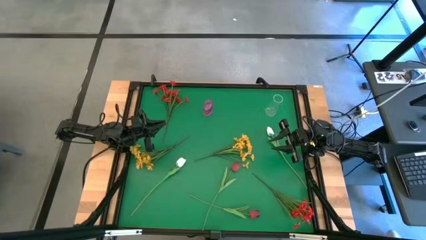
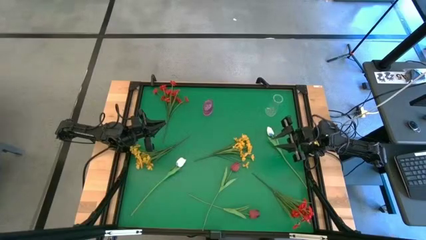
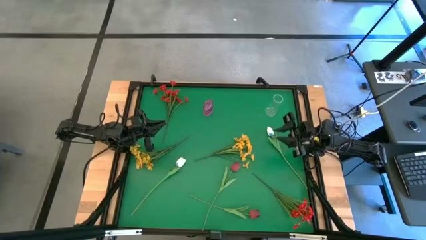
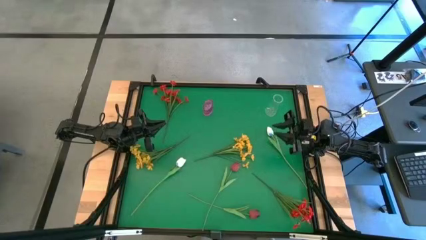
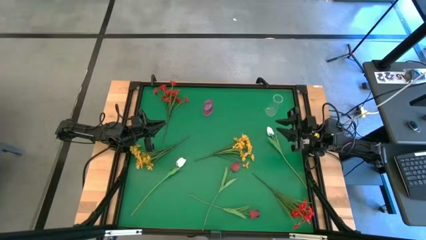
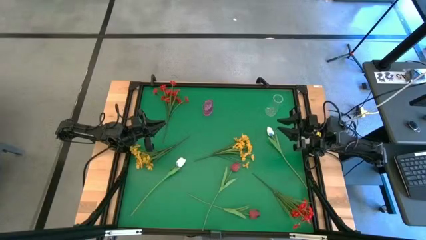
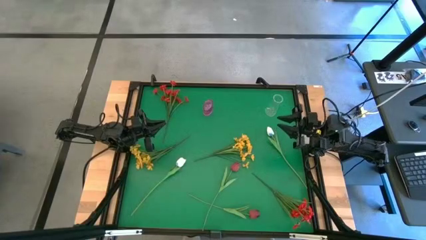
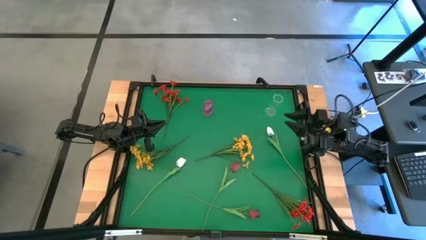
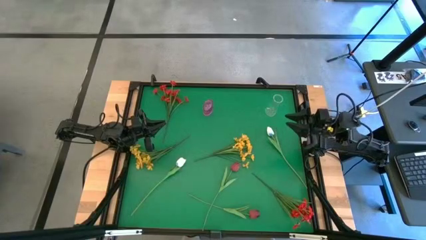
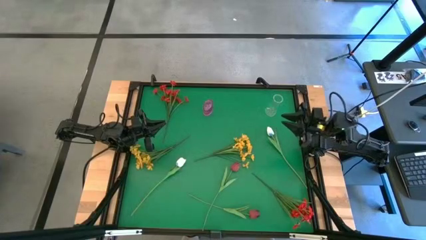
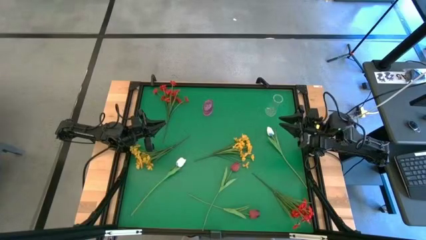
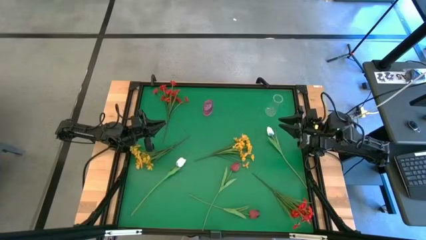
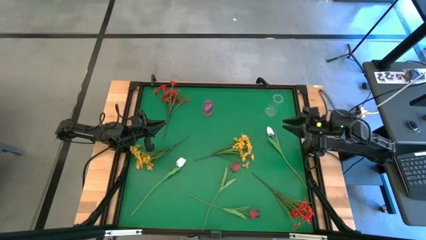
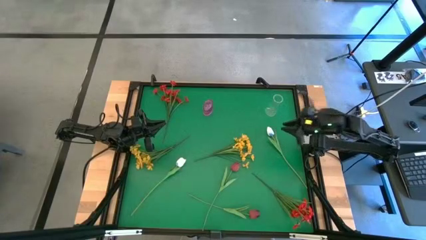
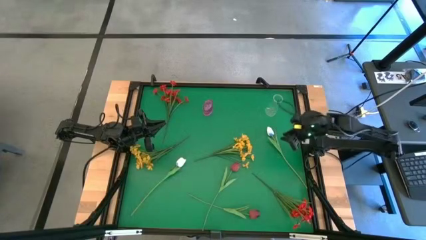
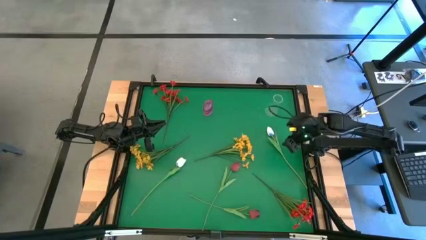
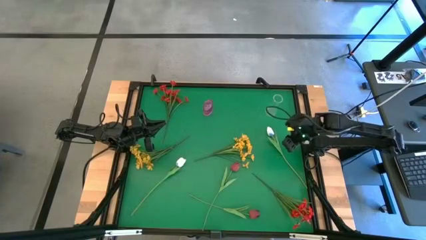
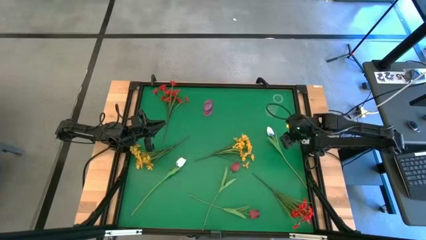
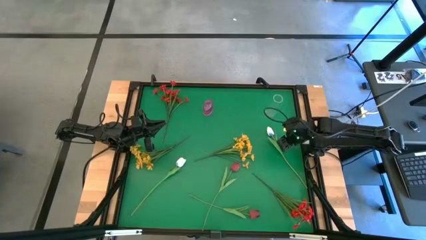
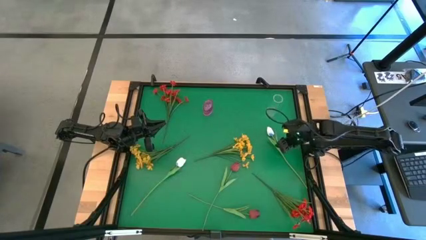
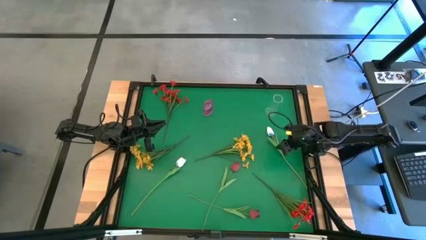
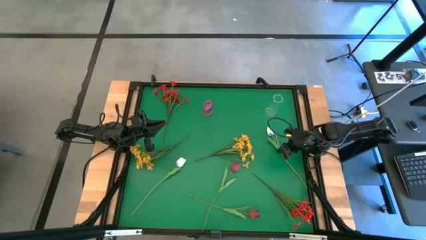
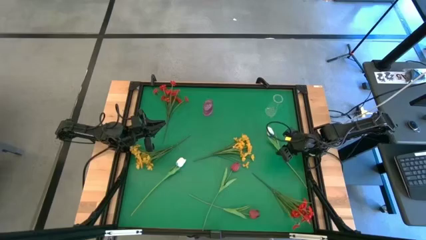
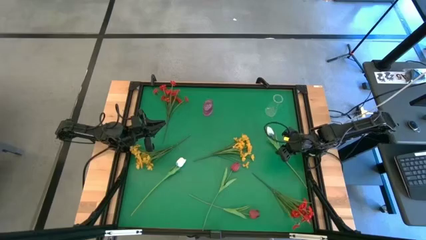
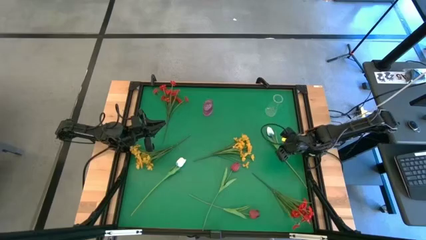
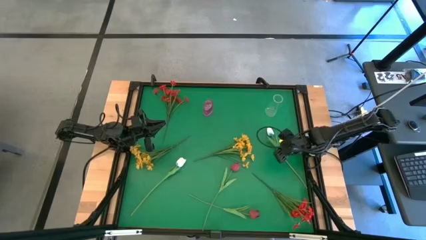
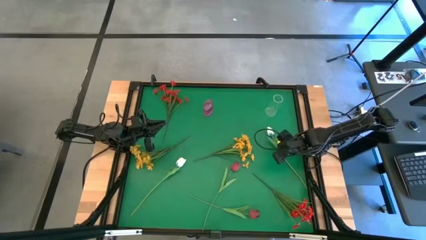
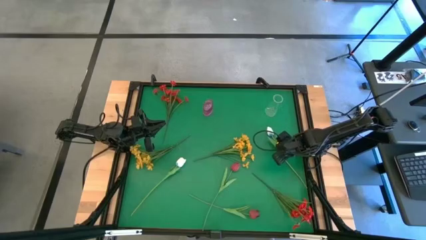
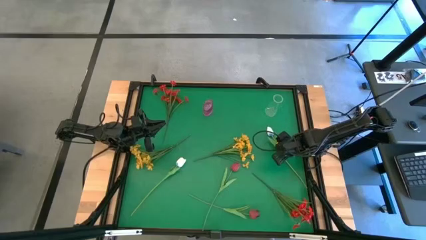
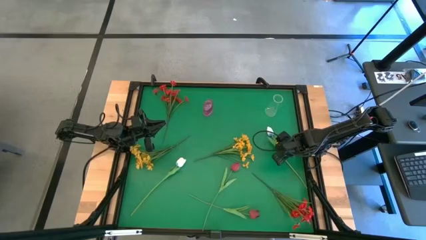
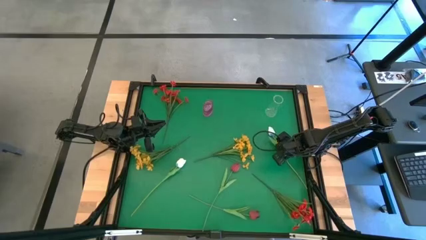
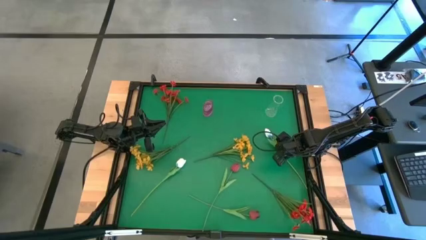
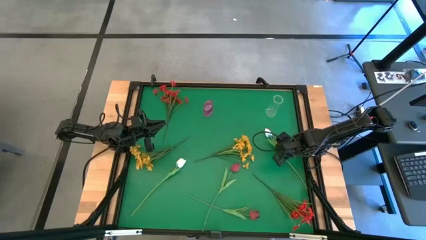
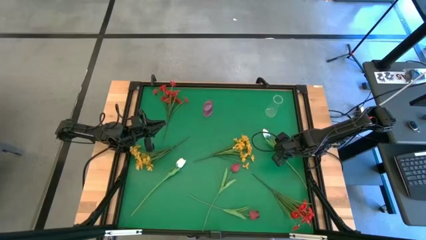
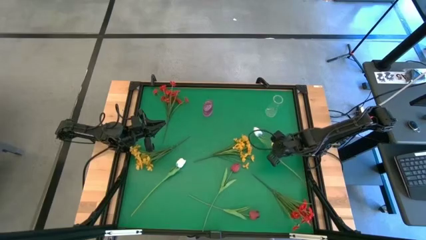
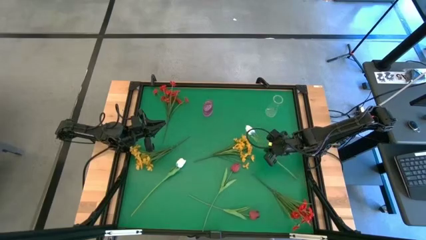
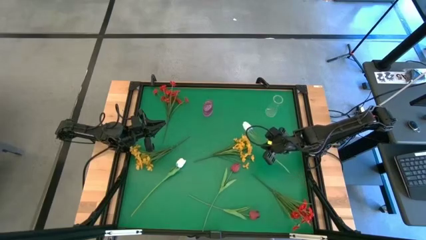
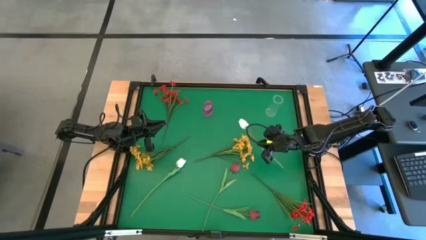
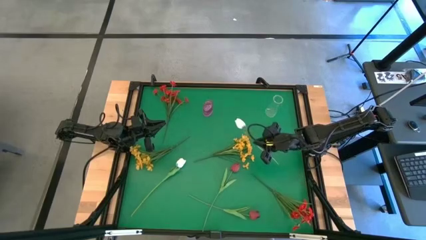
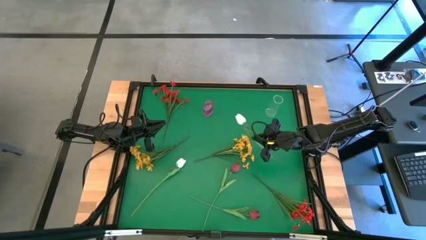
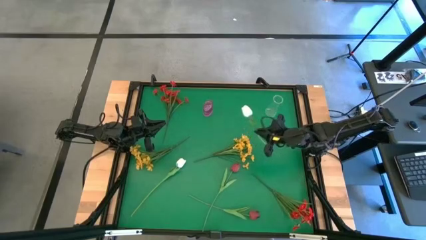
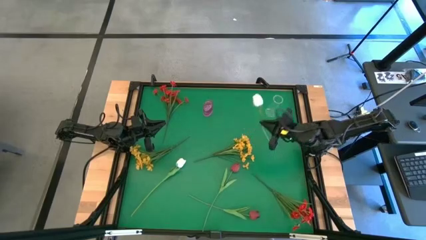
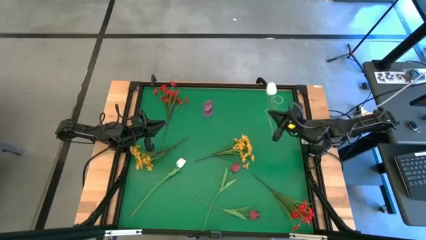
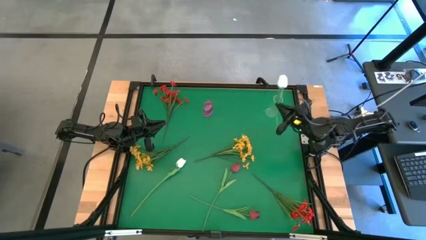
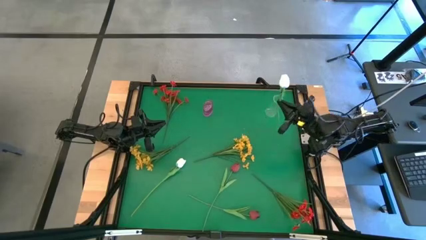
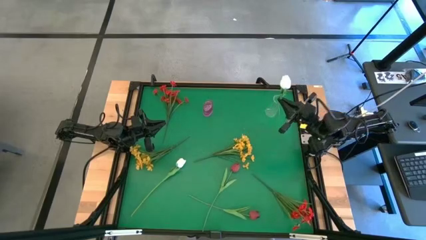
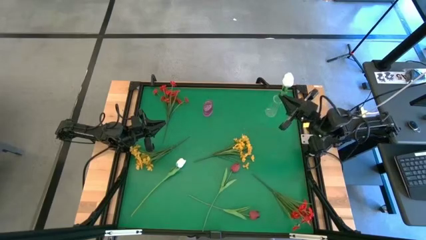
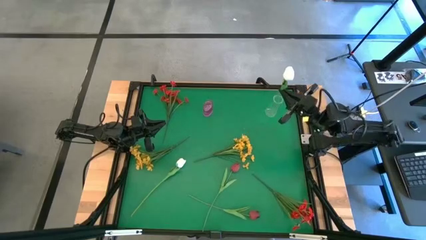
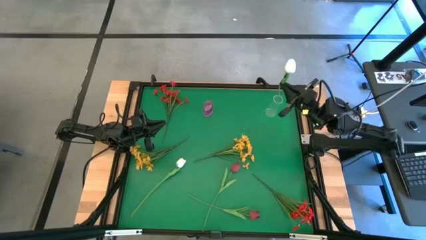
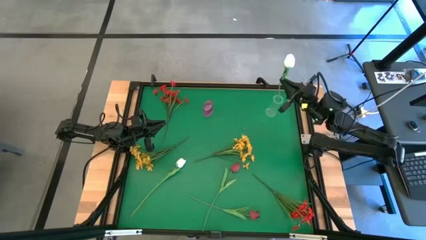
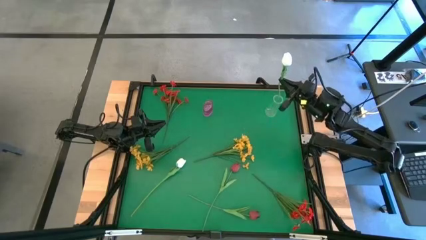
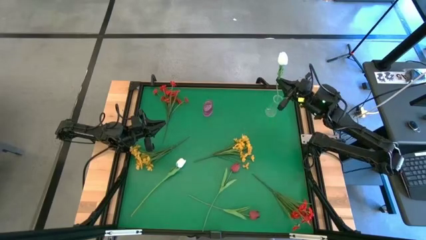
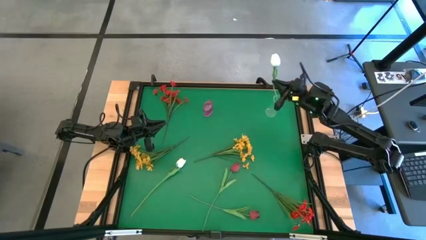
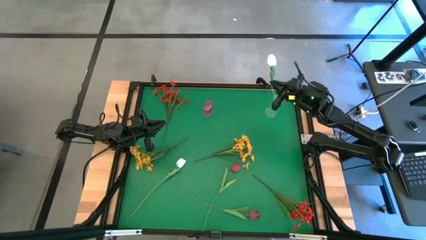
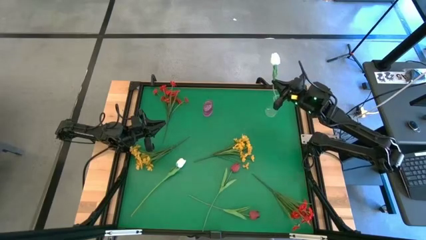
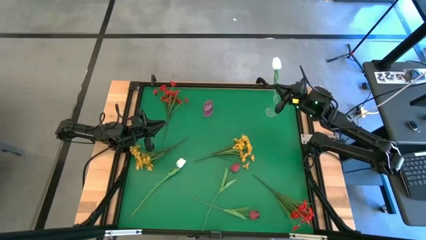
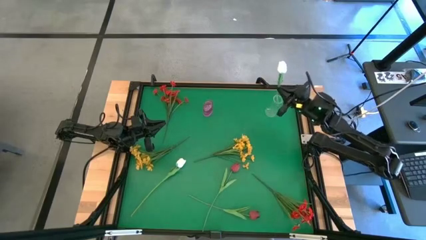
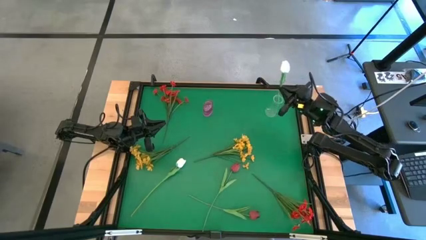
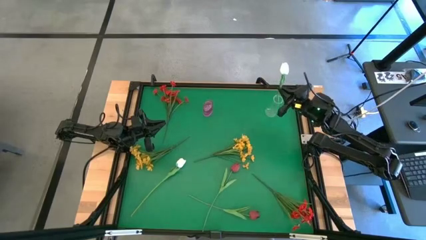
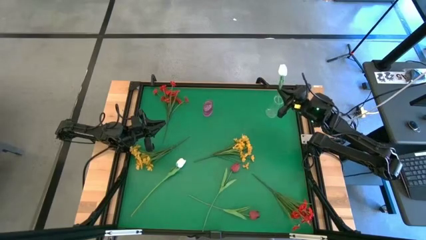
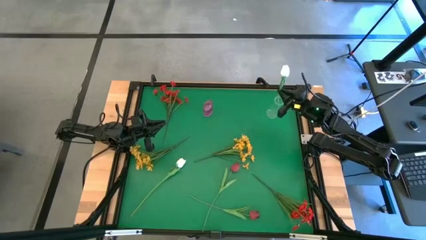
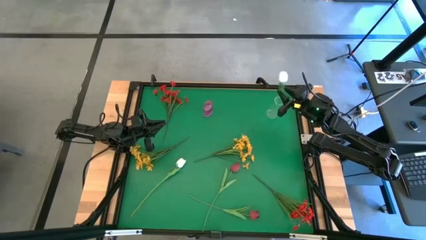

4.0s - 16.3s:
Task: Sort flowers into vase by color
Put the top white flower into the transparent vase

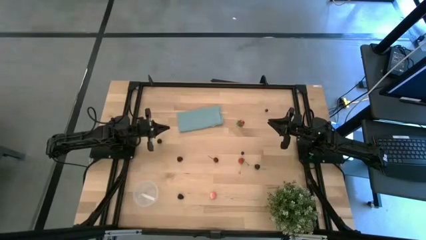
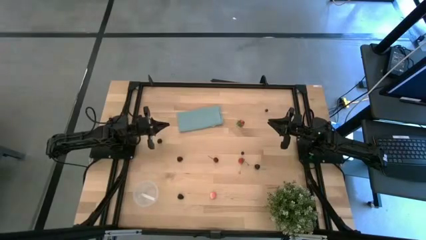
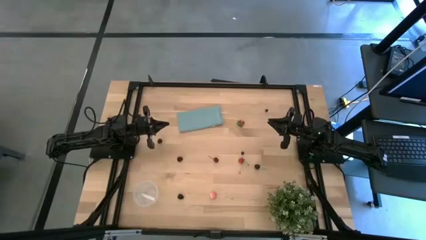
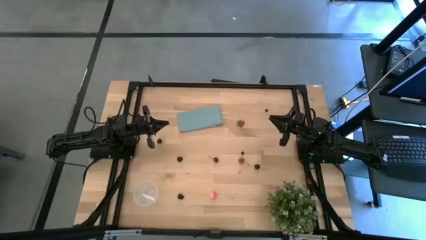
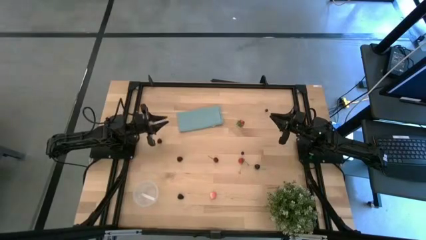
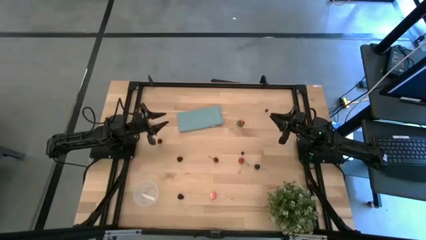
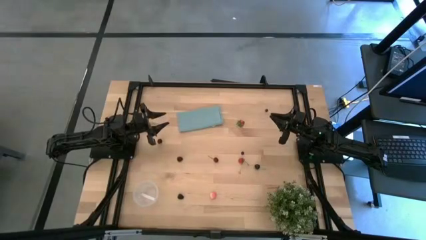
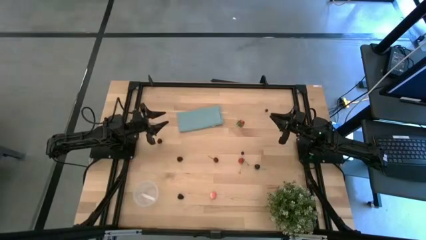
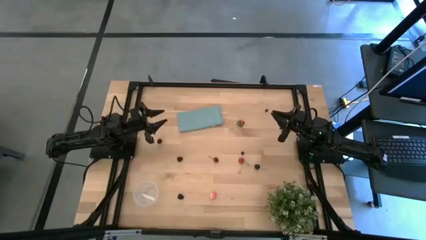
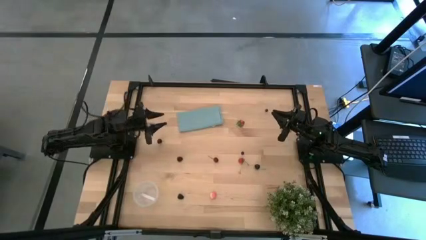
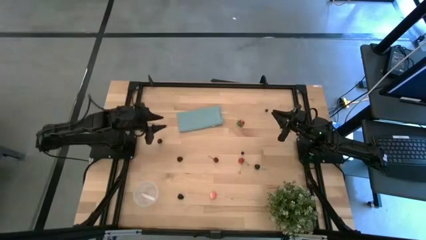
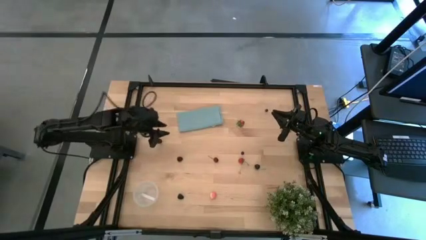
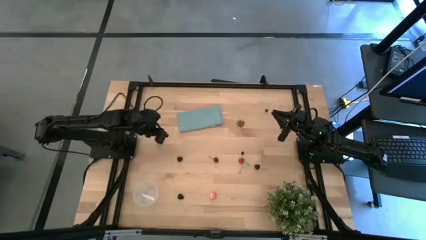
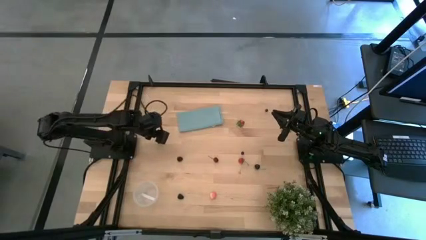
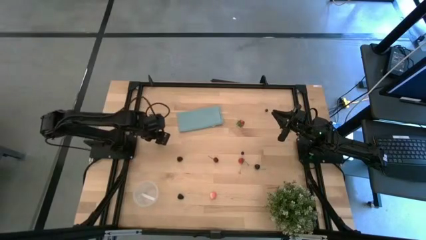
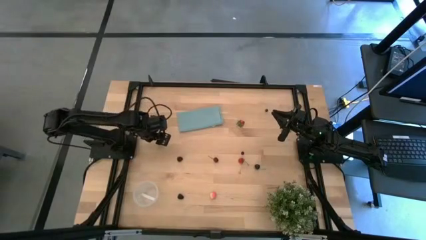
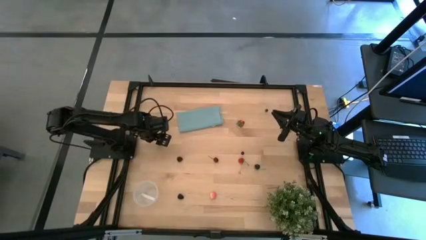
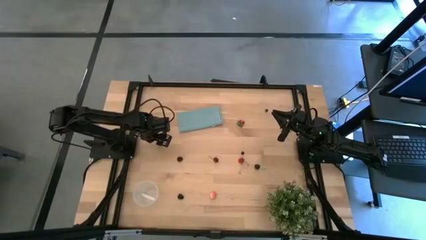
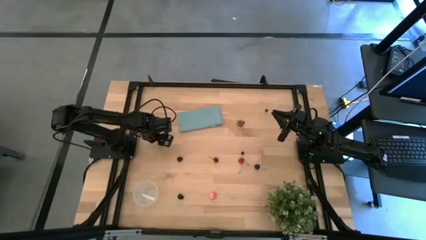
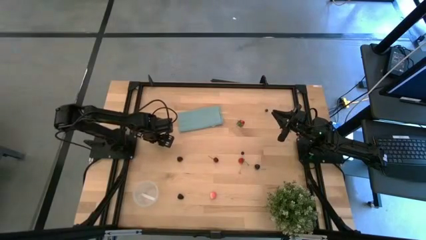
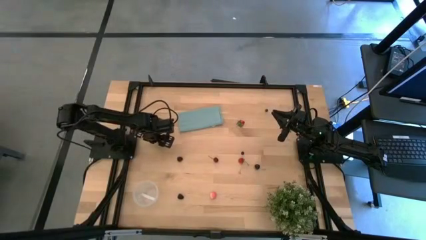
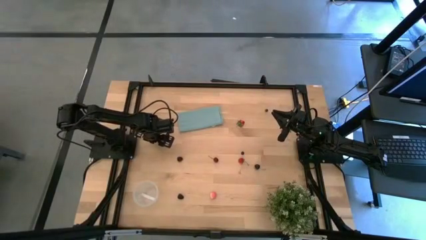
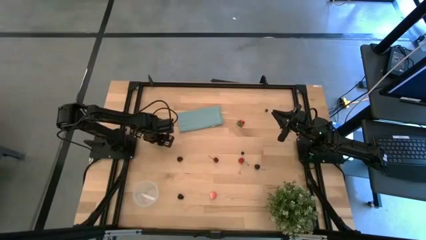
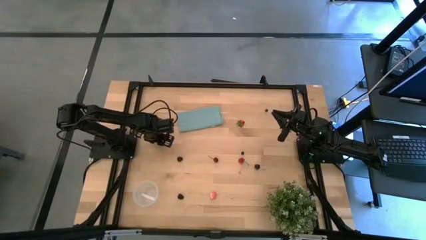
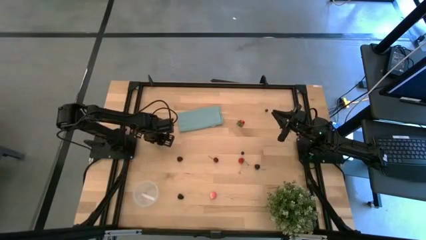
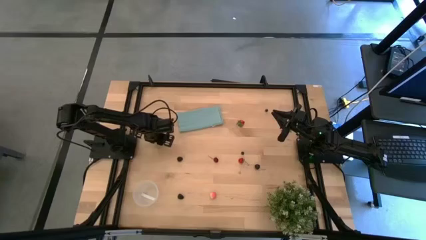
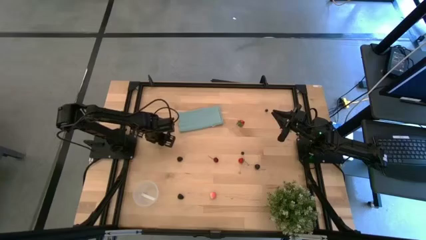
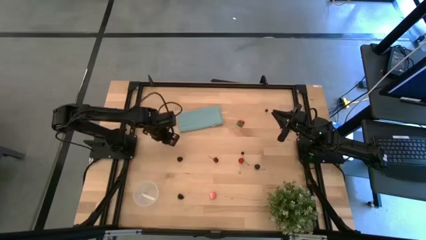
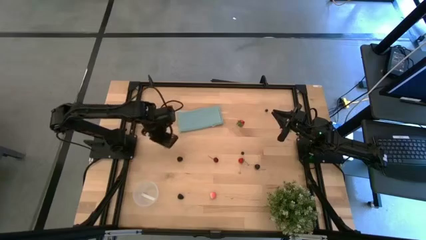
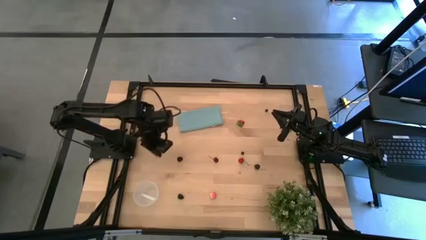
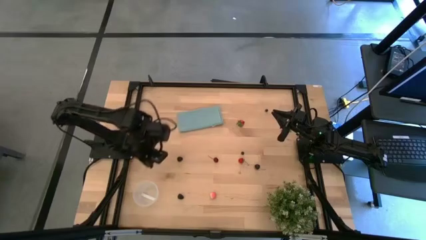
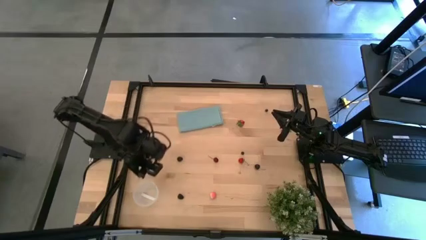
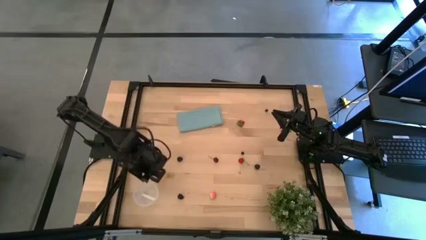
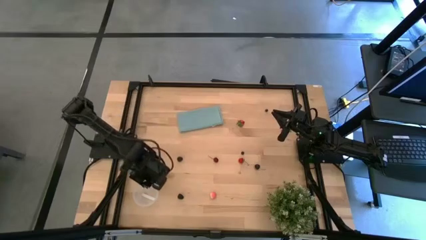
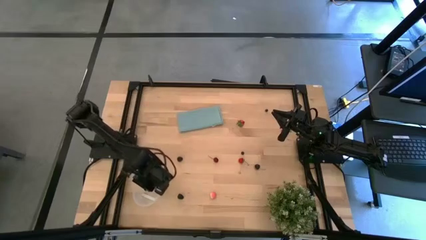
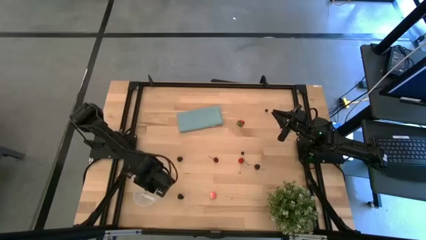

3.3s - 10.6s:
Task: Pick and placing Produce into tupperware
Put the left black cherry into the transparent container
